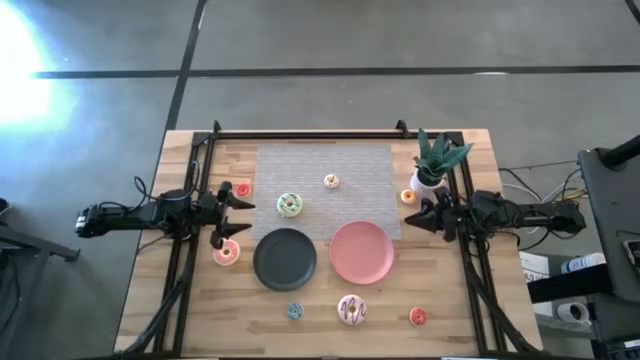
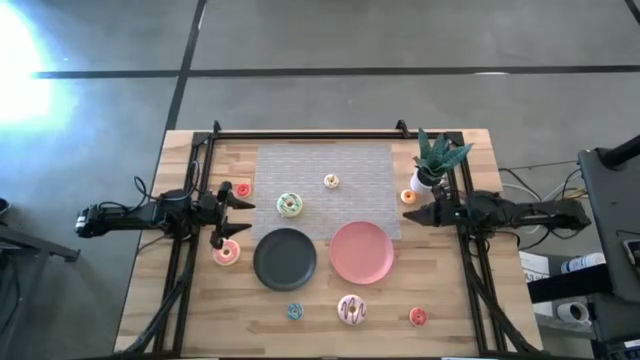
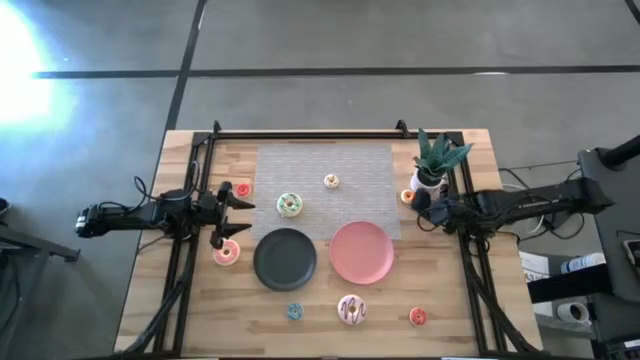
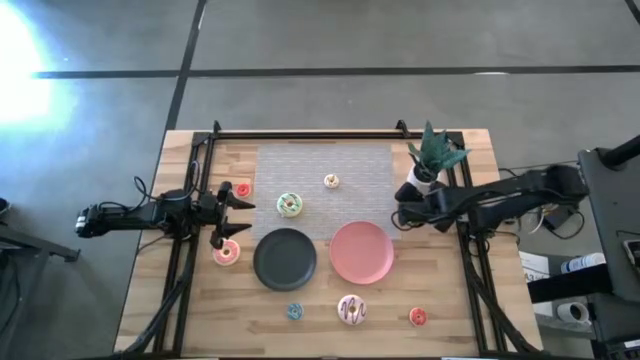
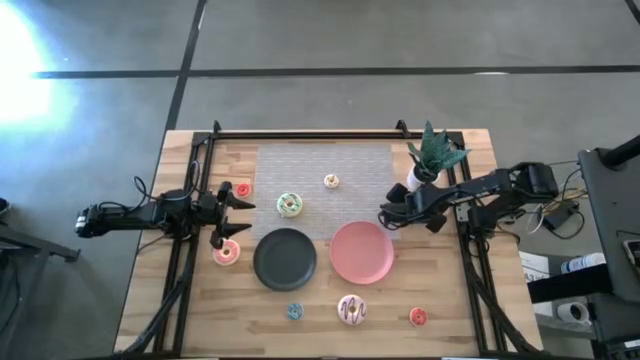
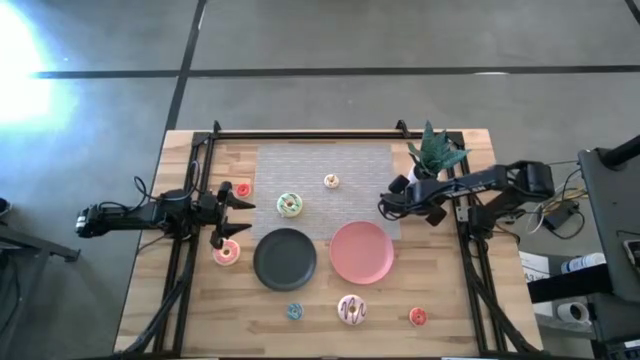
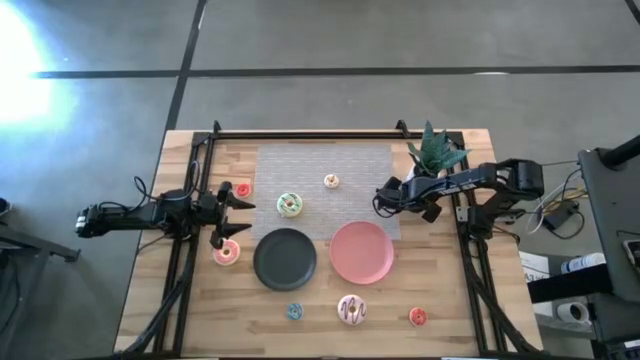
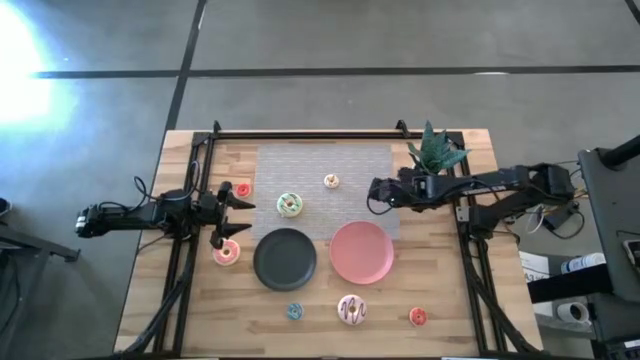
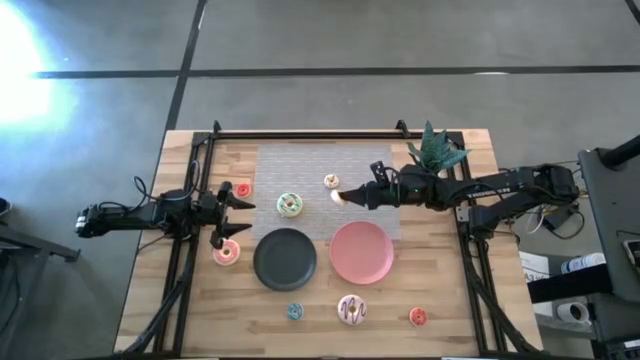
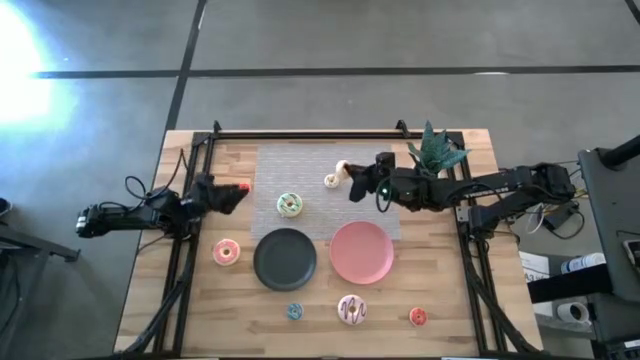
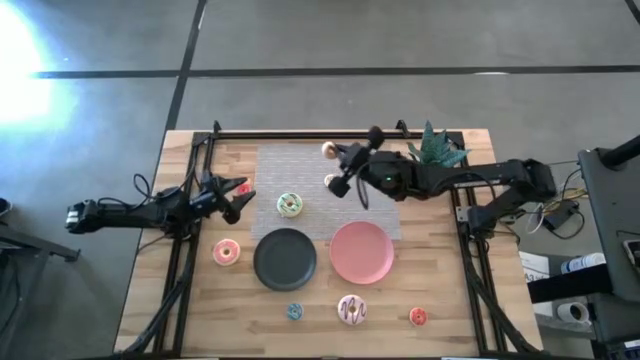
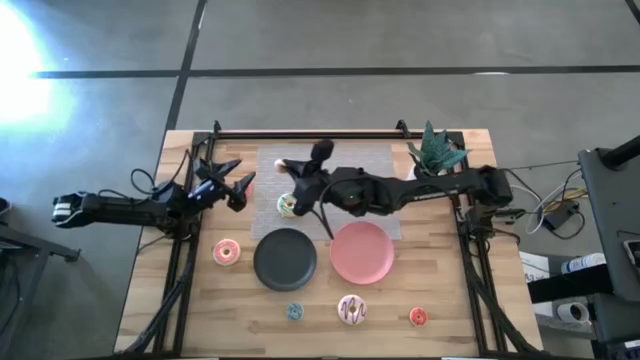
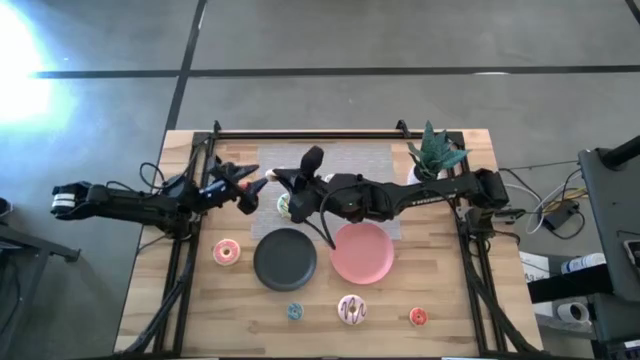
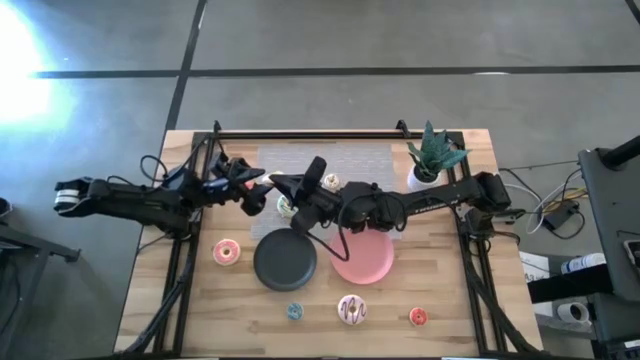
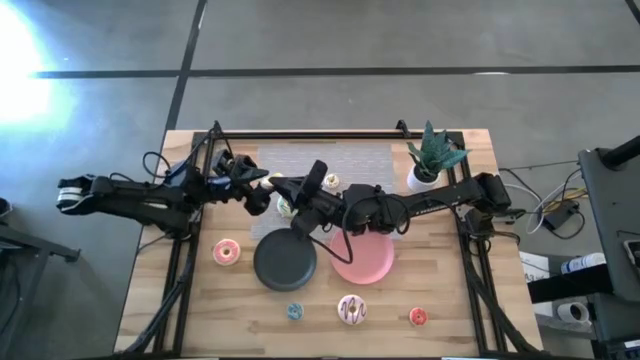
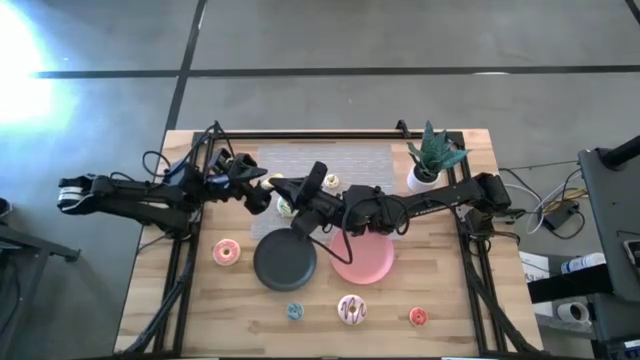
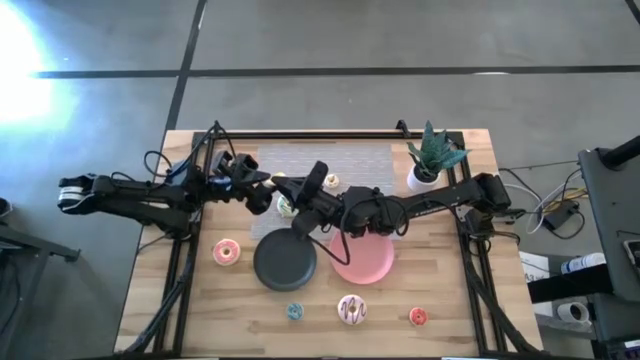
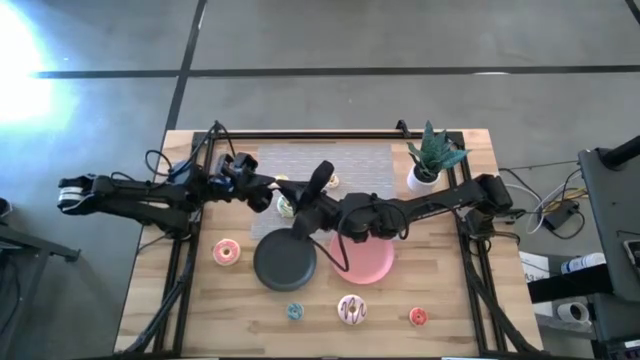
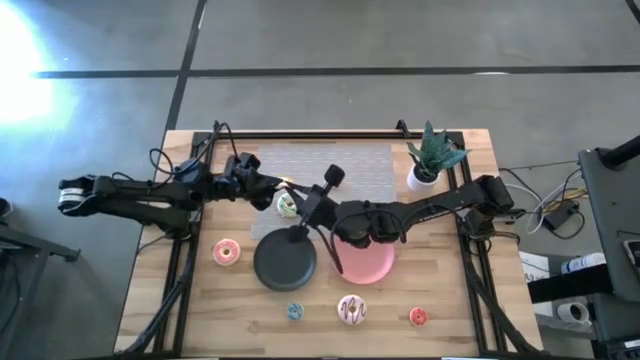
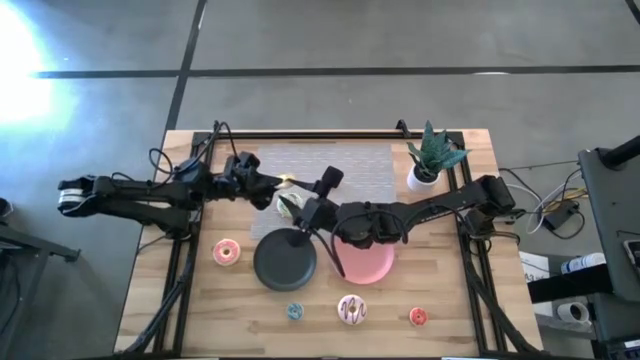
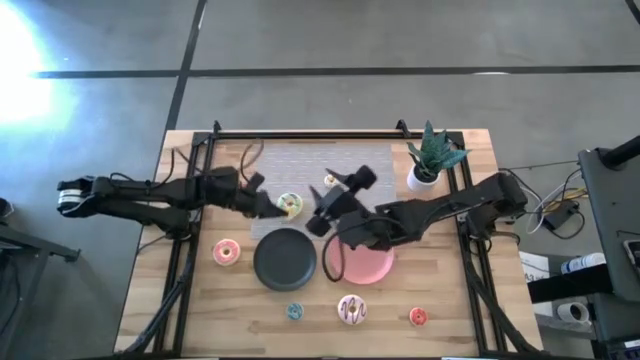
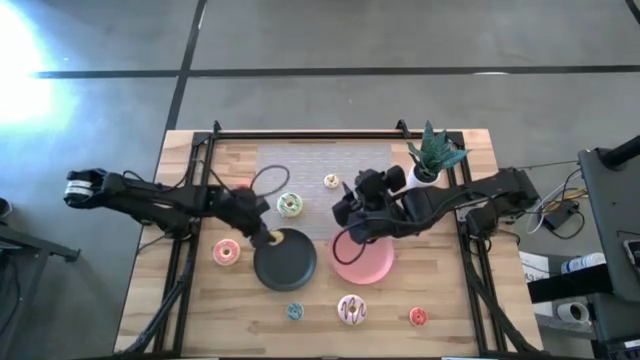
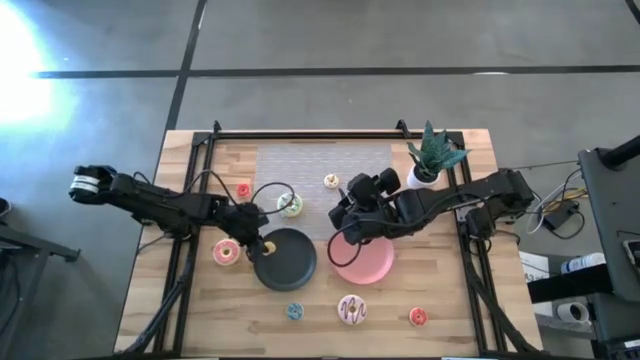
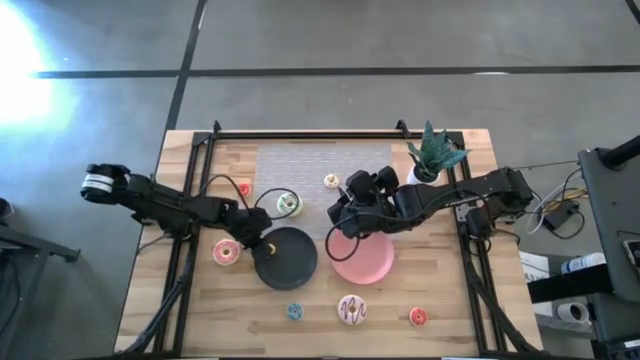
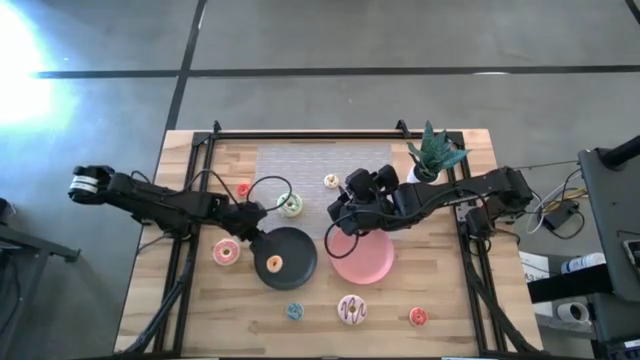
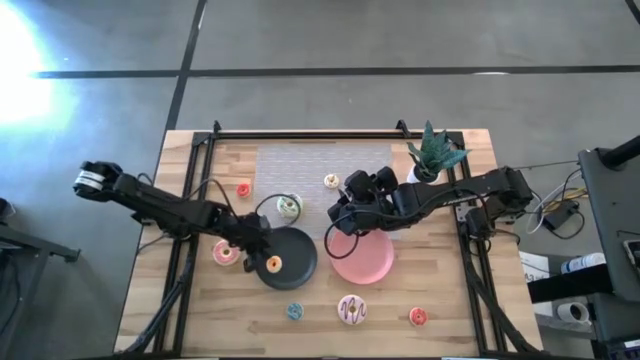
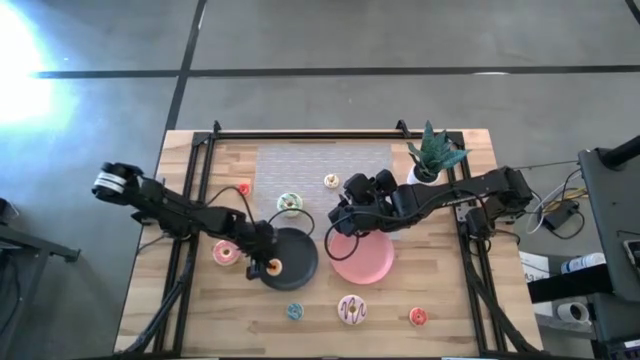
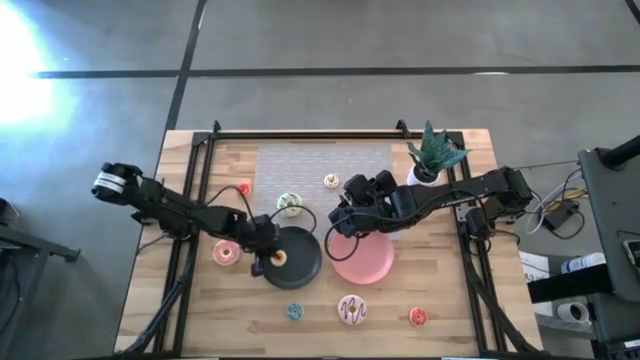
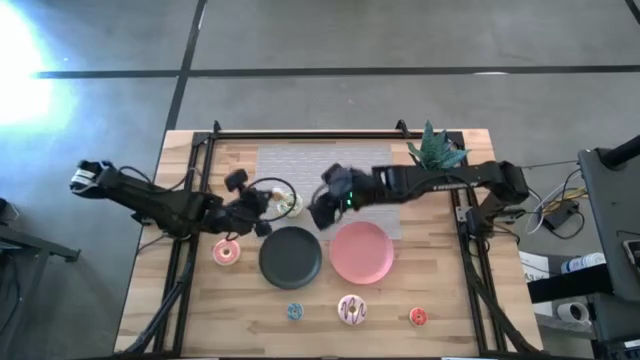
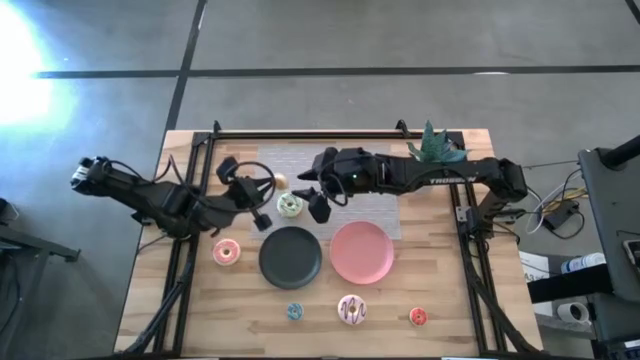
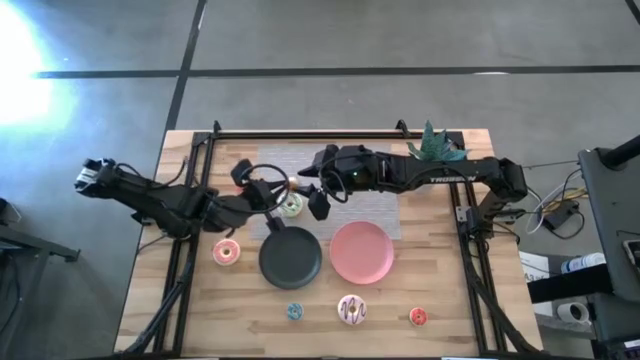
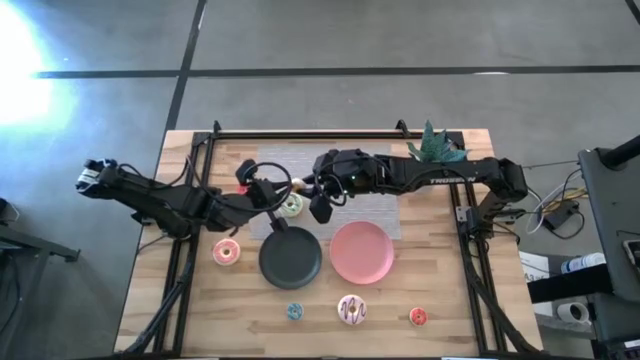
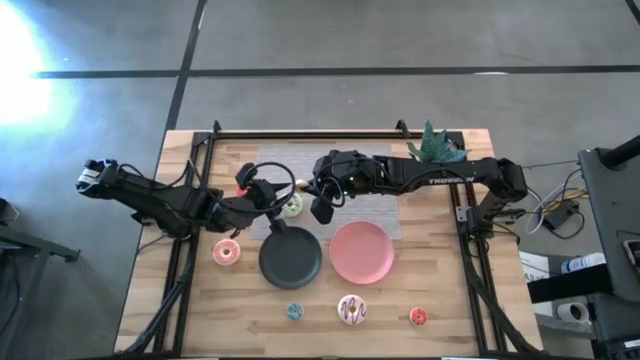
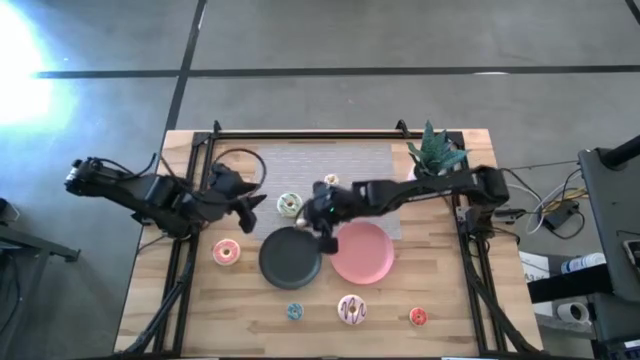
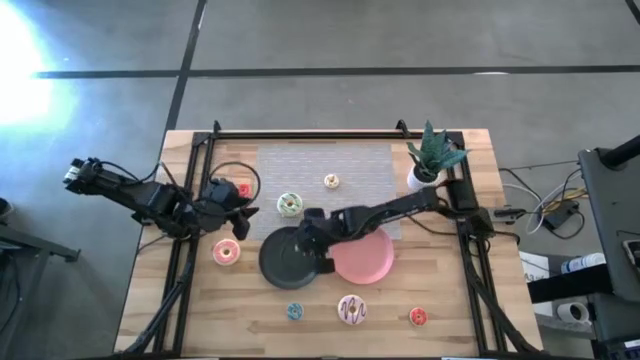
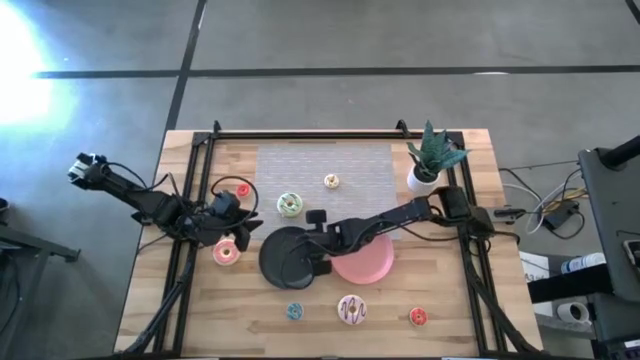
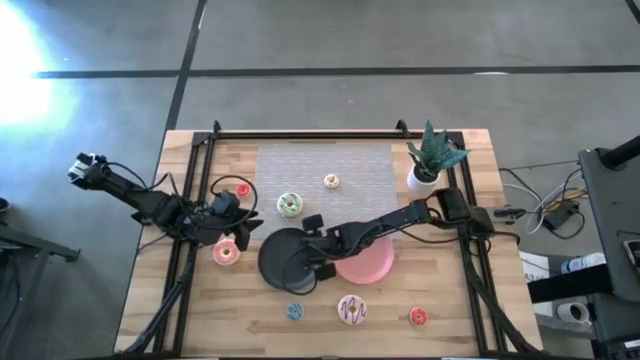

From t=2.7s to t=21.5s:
Task: Pick & Place donuts
Put the small yellow doughnut on the black plate

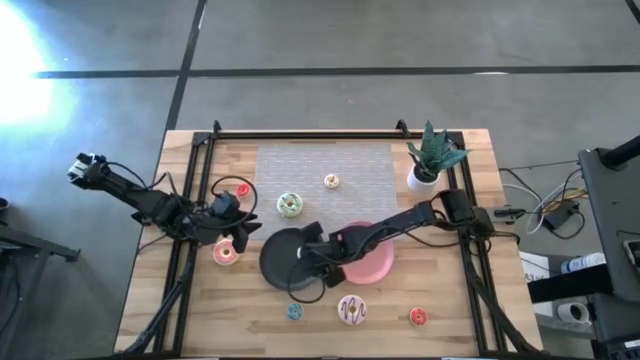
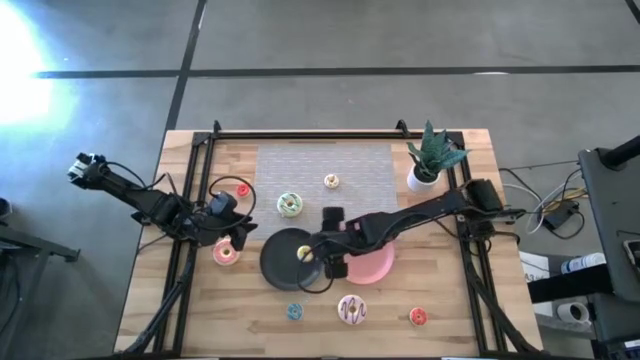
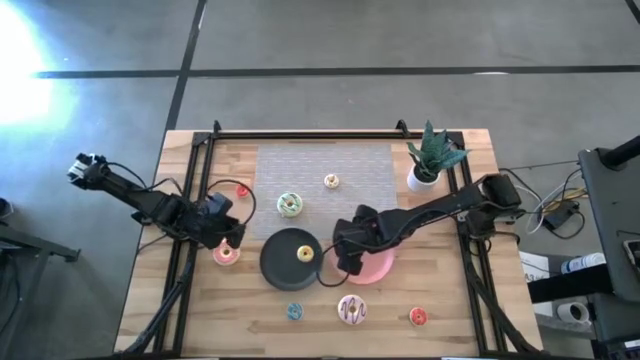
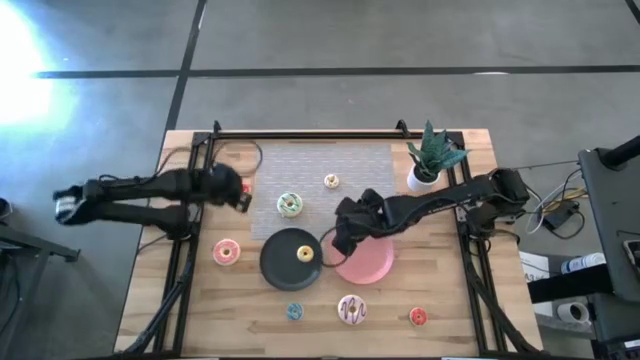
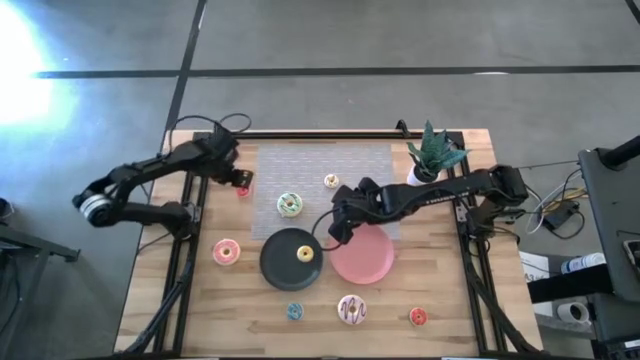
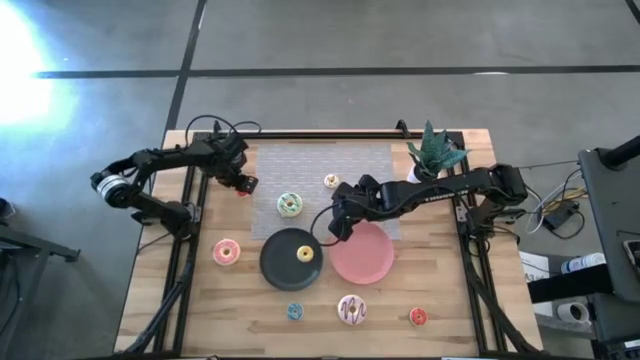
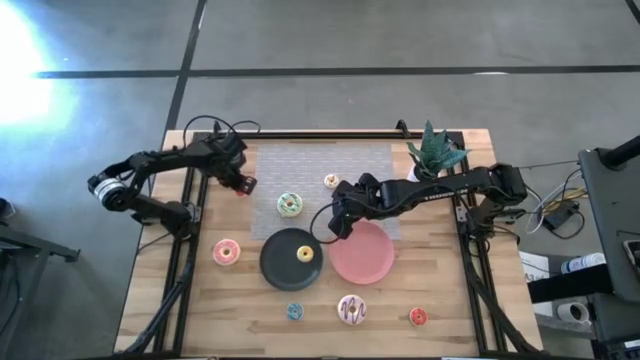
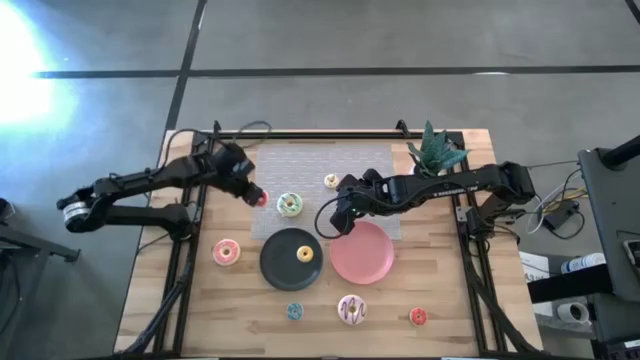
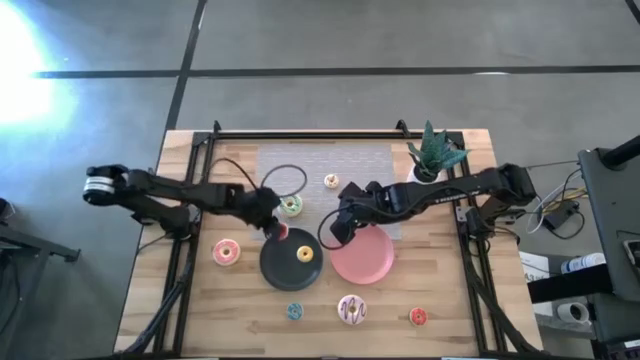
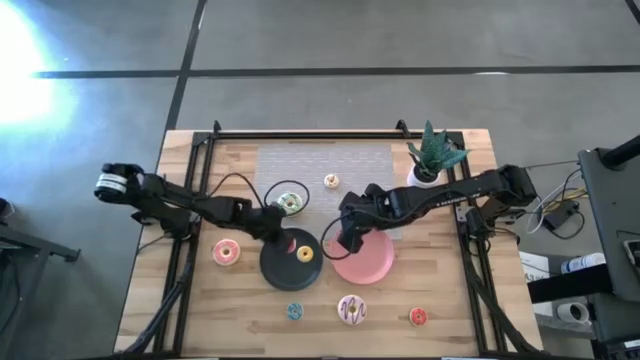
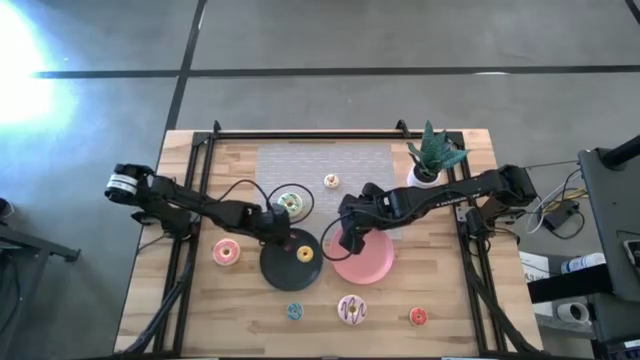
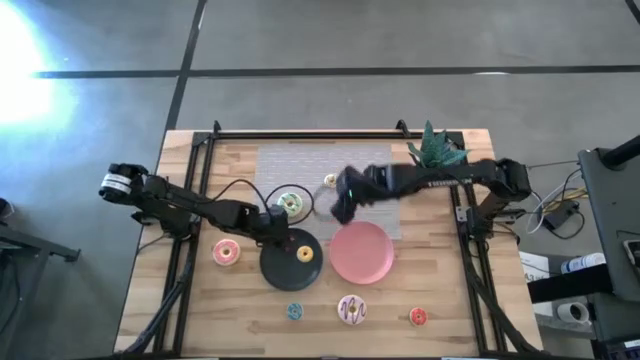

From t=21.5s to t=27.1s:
Put the small red doughnut on the black plate
